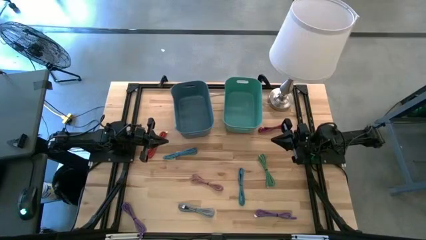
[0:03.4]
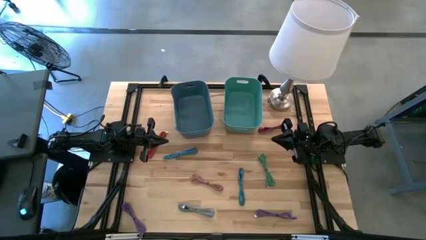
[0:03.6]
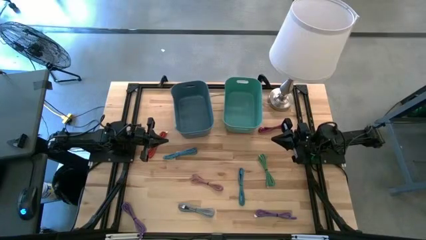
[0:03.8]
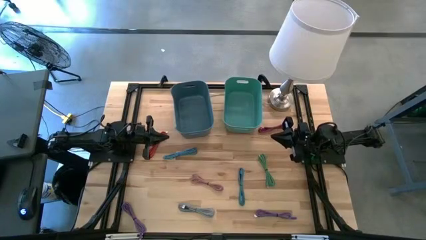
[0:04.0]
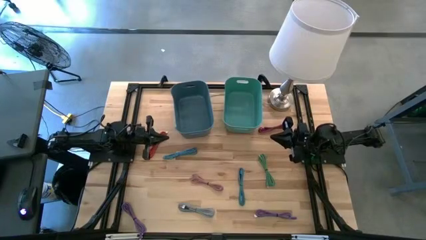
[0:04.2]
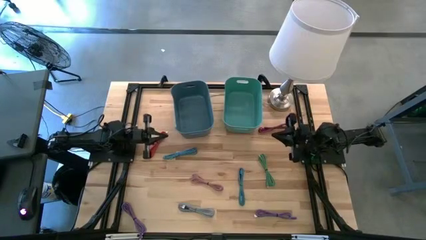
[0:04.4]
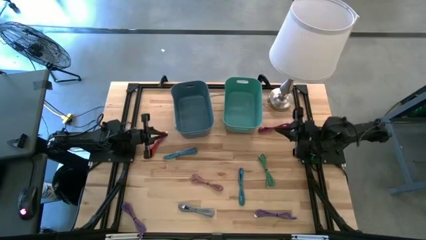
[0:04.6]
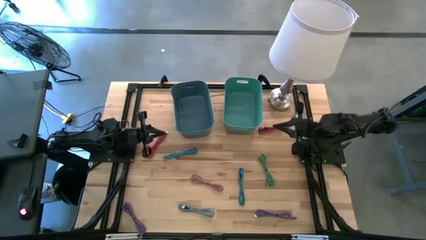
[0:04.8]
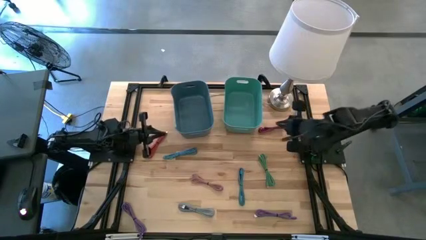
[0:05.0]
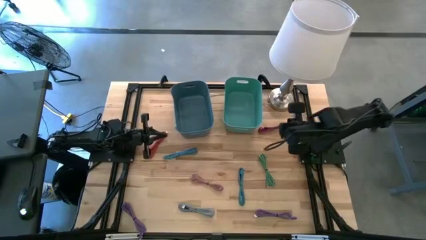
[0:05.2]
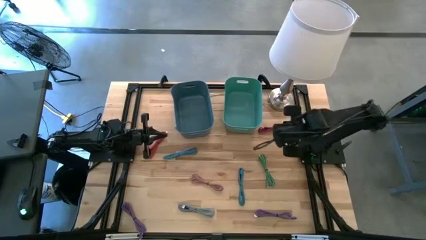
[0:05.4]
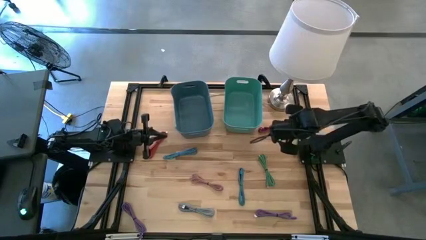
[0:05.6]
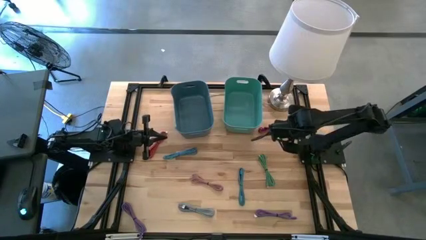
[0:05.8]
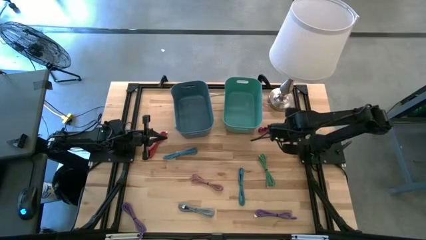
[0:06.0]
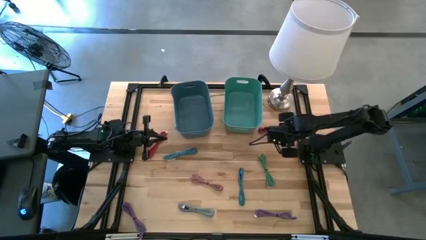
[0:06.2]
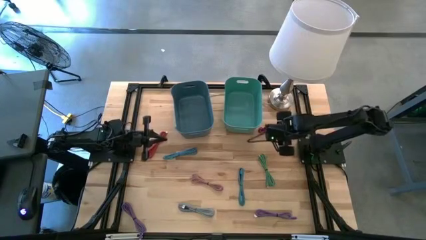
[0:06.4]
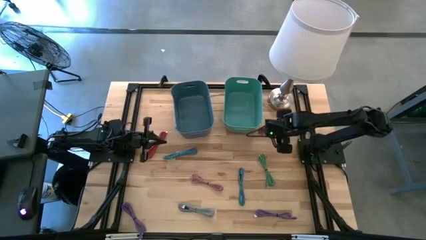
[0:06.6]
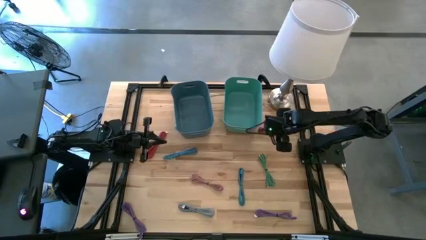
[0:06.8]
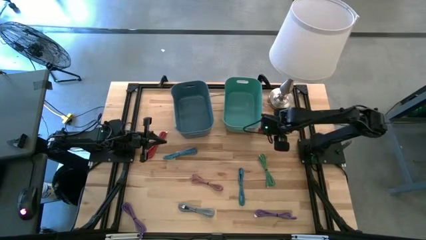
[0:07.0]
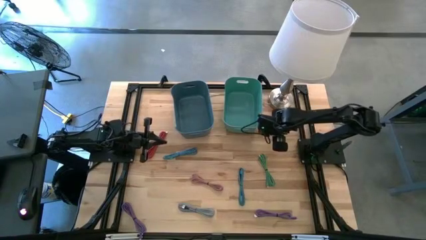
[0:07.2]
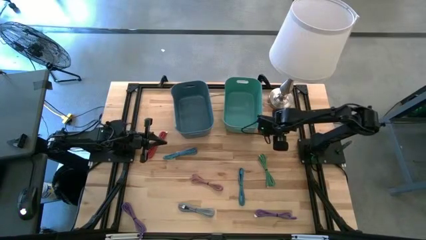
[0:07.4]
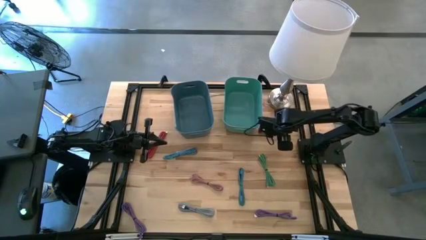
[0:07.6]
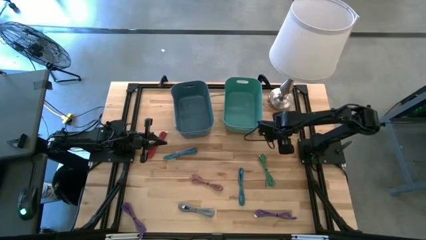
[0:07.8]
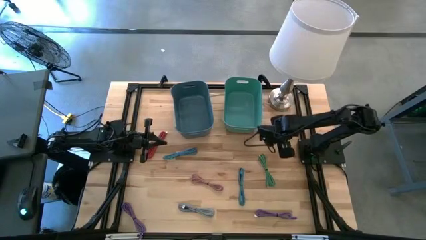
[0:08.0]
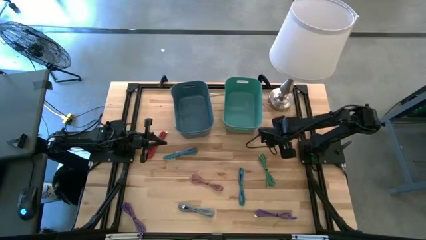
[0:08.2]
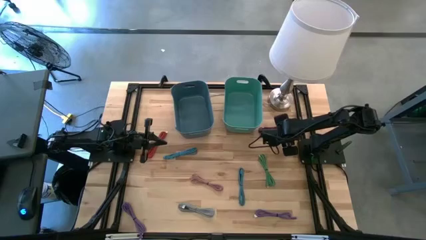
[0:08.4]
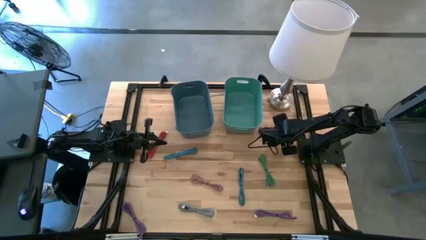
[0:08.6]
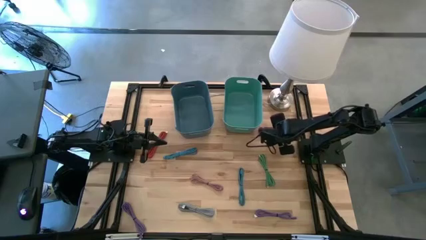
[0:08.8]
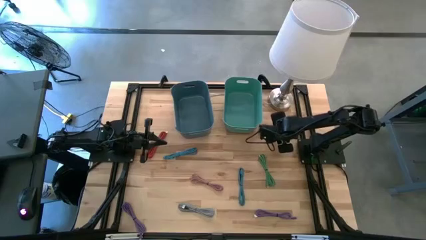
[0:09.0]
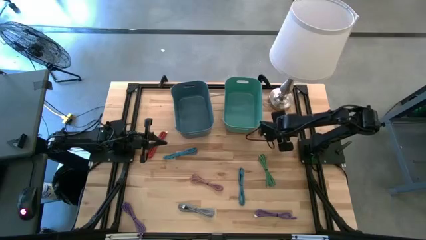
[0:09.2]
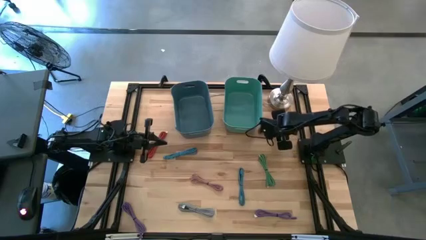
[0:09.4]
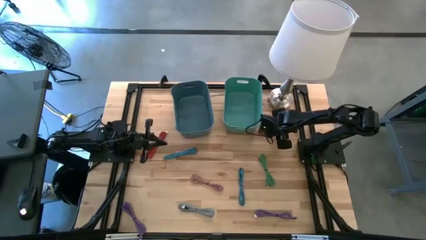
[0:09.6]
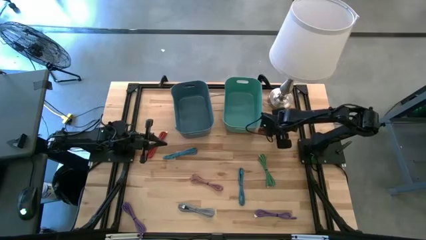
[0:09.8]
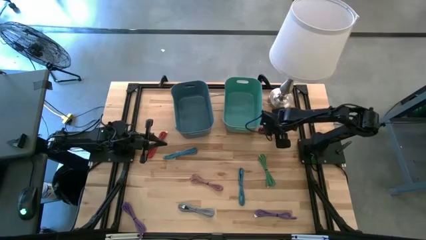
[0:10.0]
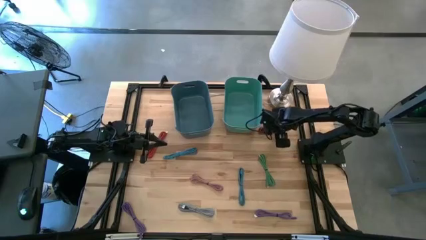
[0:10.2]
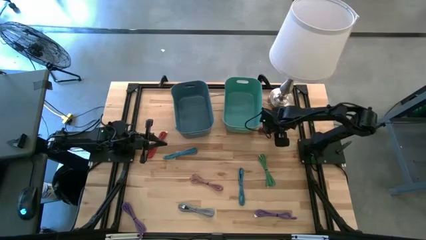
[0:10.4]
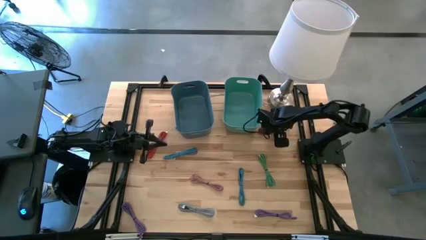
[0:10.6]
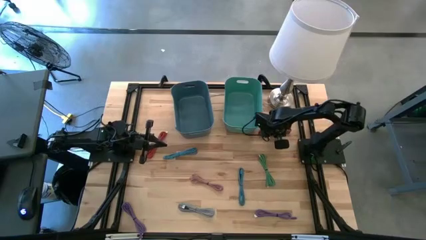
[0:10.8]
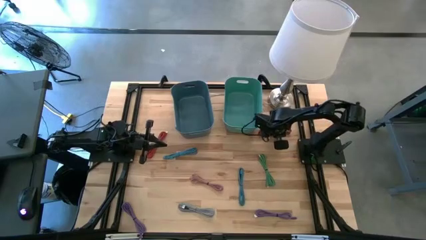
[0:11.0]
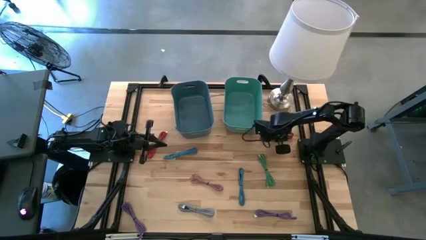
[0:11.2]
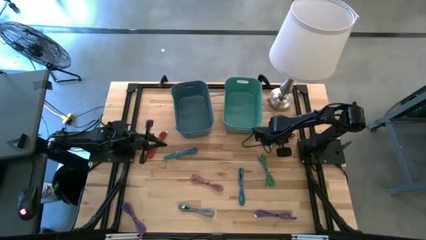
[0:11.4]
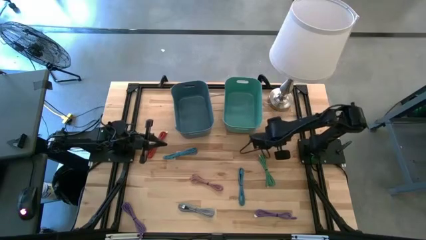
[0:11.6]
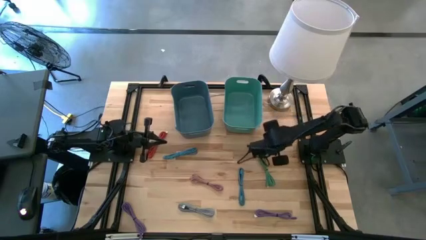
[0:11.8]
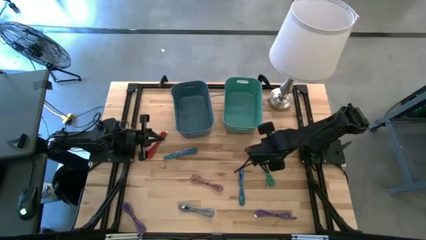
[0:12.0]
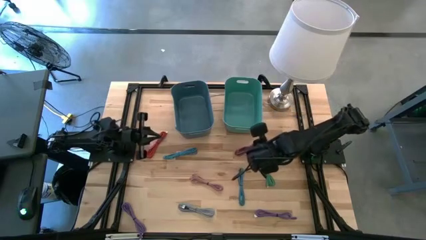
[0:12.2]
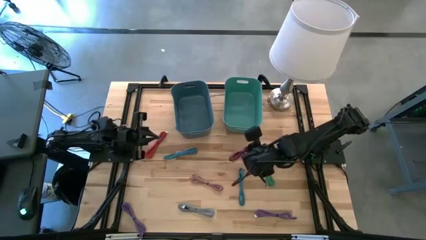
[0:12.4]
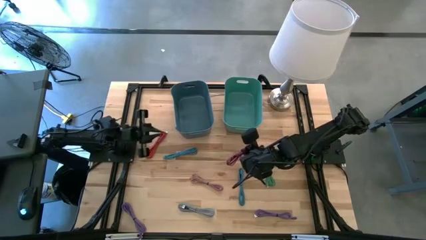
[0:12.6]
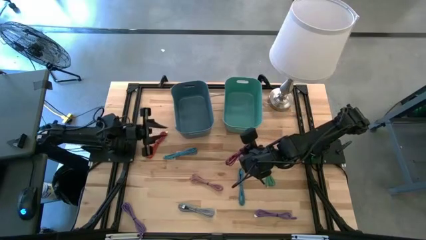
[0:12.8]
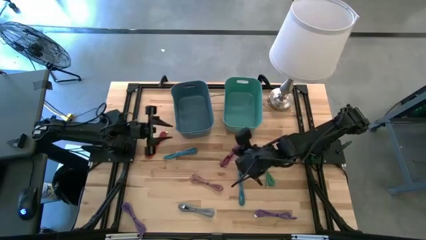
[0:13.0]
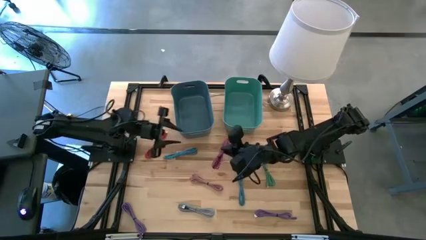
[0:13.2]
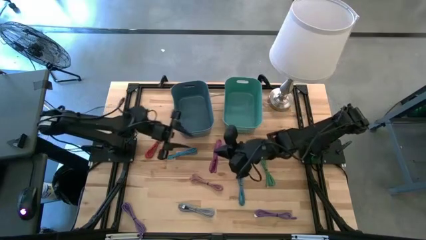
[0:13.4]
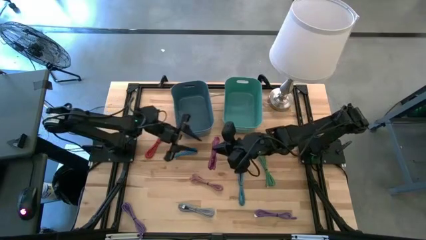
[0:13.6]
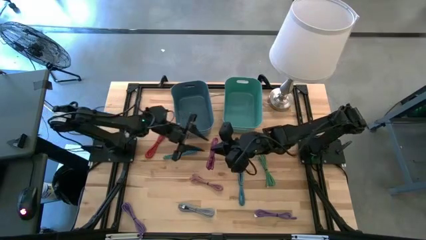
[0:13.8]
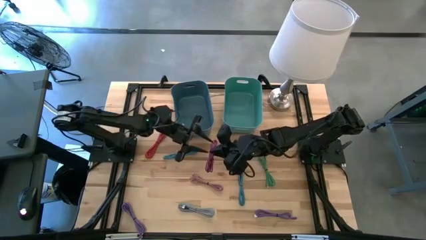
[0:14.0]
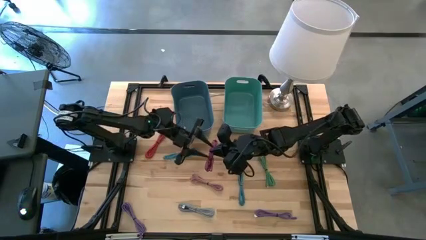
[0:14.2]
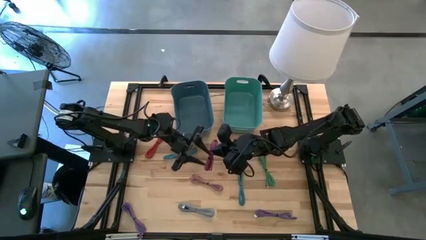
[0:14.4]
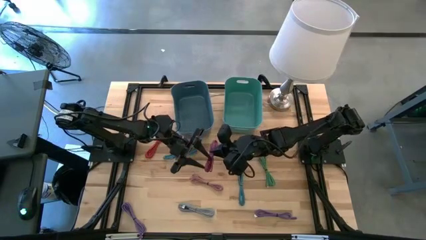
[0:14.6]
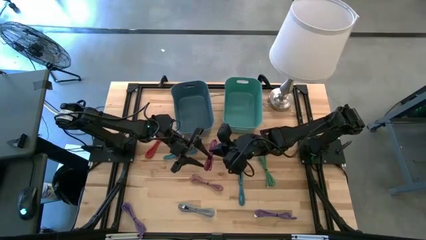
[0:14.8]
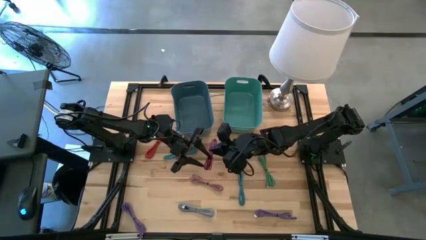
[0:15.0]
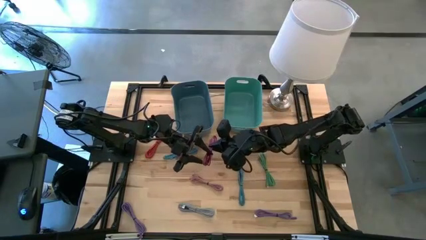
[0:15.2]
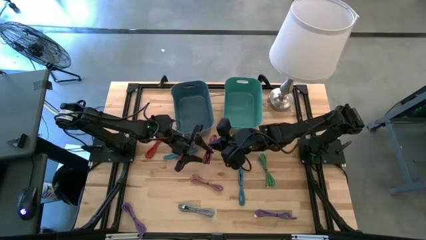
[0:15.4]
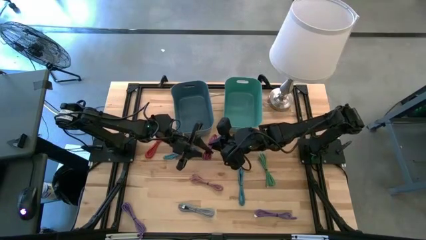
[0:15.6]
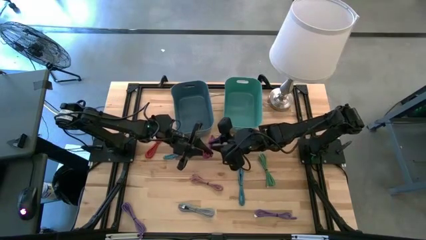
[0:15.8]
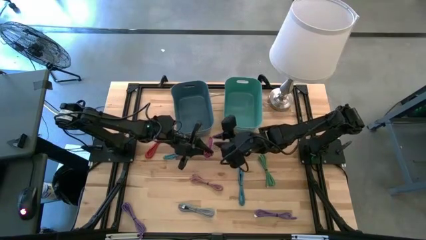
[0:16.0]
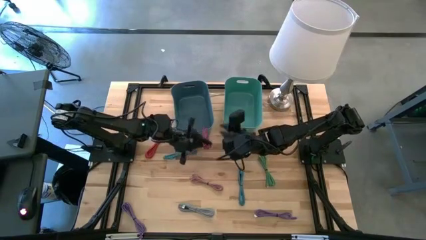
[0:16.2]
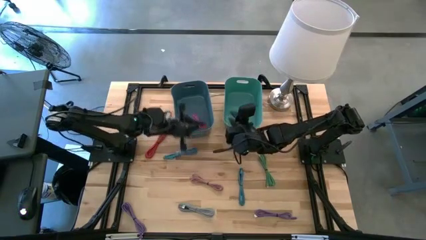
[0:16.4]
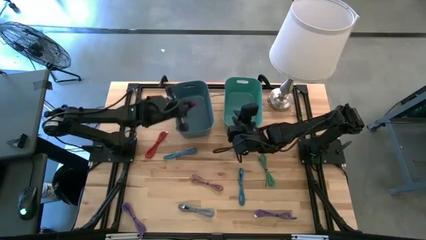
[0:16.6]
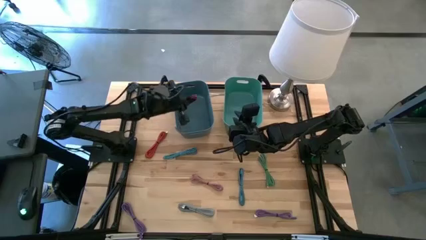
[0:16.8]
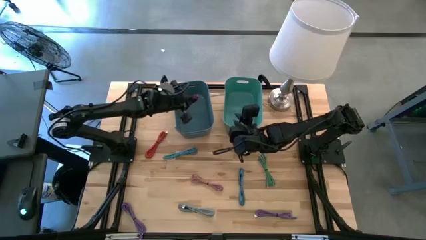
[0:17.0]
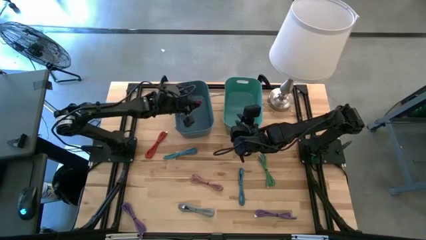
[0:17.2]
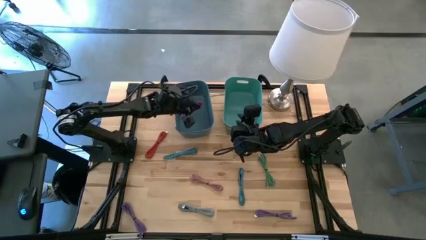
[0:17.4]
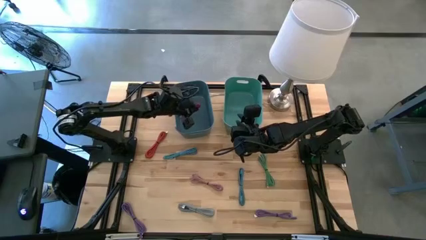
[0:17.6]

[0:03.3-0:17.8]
Task: Pick & Place USB Port
Put the black and pink charger cable into the blue bin

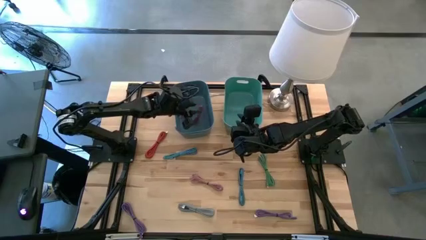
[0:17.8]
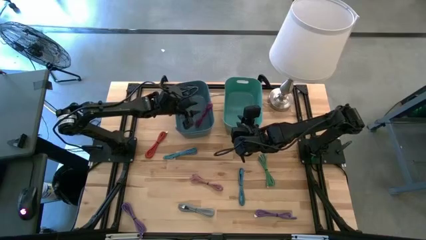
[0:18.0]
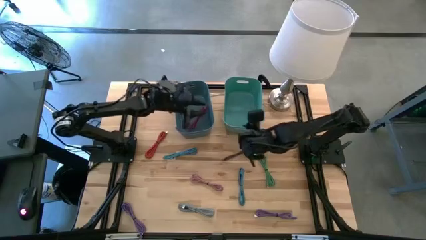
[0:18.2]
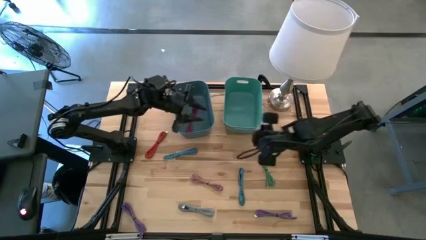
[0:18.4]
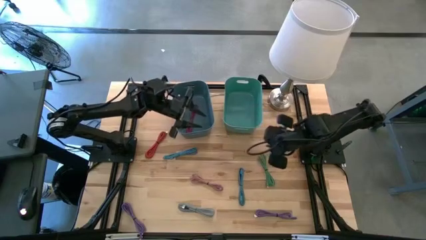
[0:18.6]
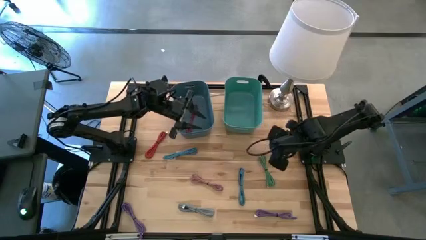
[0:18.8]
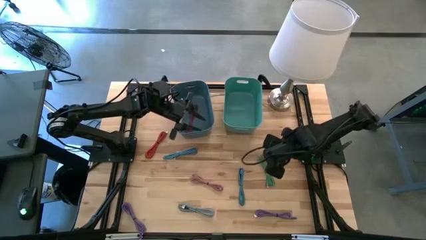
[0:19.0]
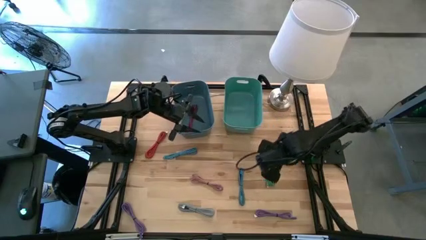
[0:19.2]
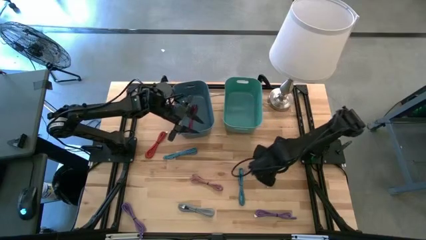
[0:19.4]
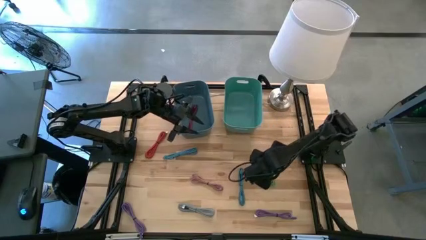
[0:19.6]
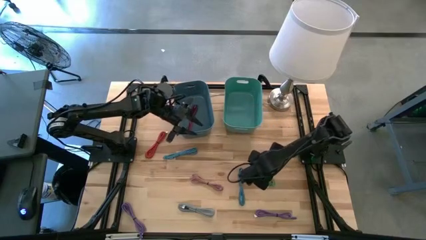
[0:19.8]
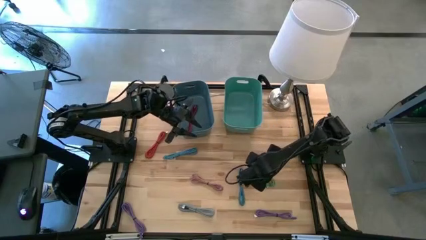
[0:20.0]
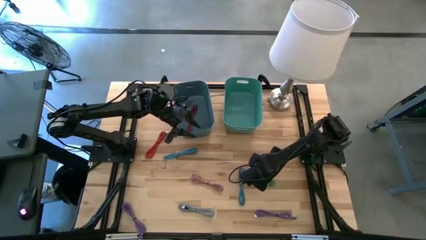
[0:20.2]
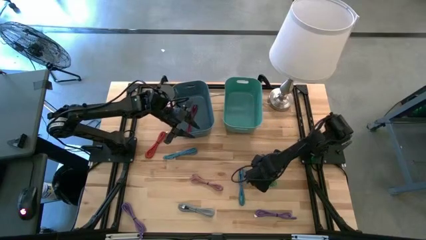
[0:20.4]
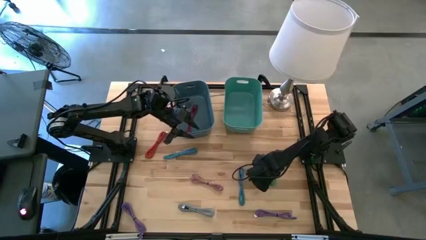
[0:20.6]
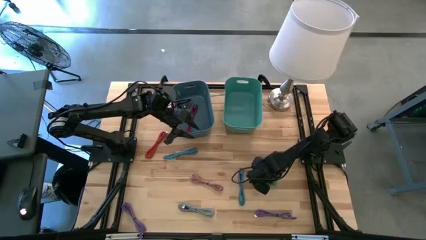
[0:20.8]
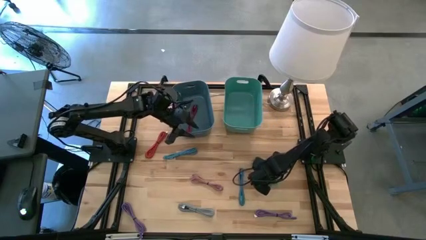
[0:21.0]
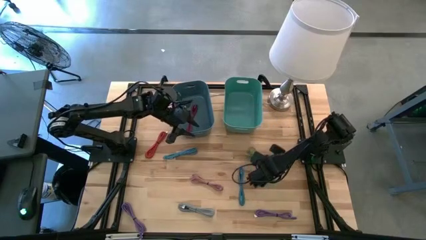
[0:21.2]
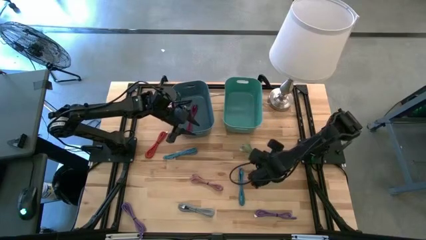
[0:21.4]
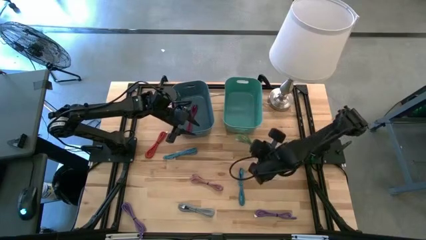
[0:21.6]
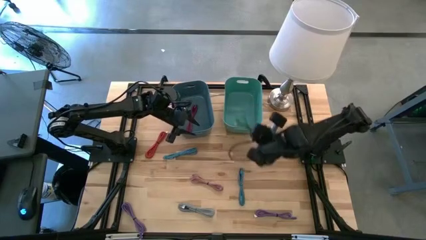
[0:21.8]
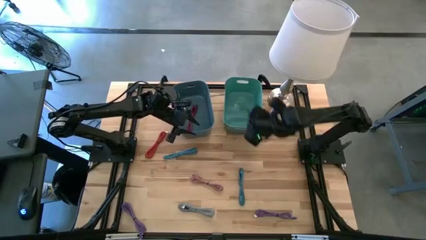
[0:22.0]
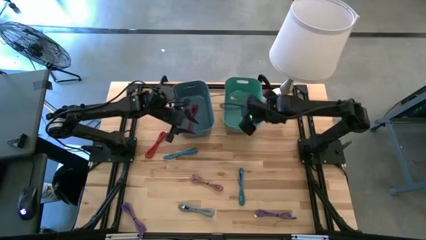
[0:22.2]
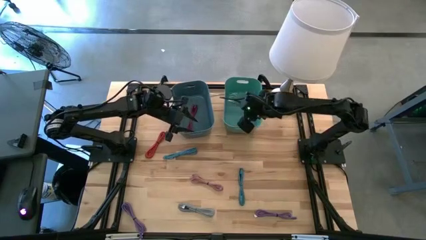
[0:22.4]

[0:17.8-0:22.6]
Put the green charger cable into the green bin
